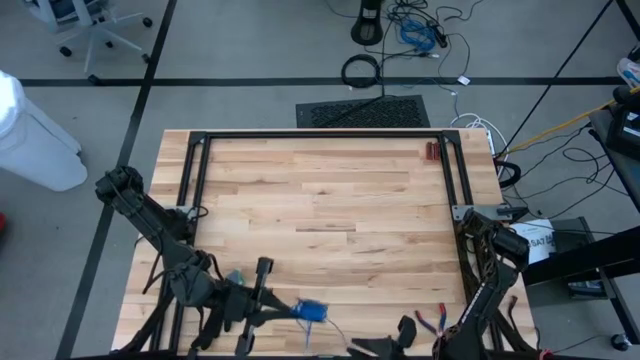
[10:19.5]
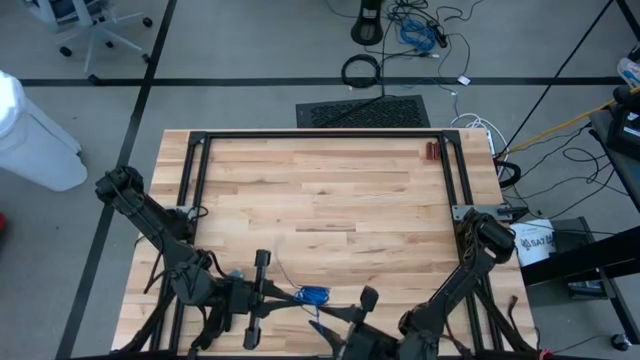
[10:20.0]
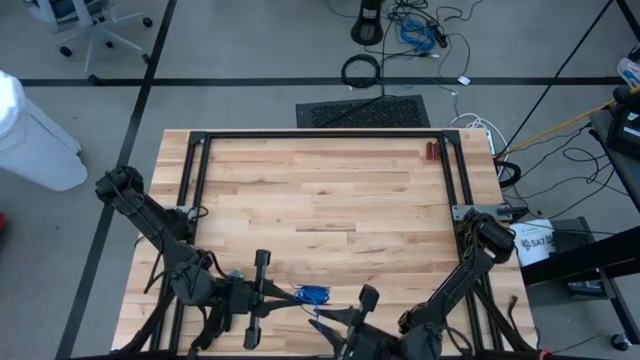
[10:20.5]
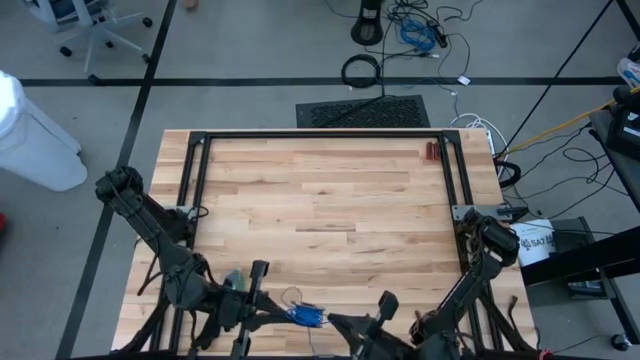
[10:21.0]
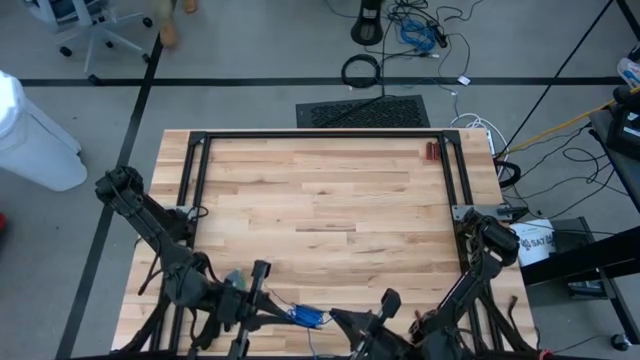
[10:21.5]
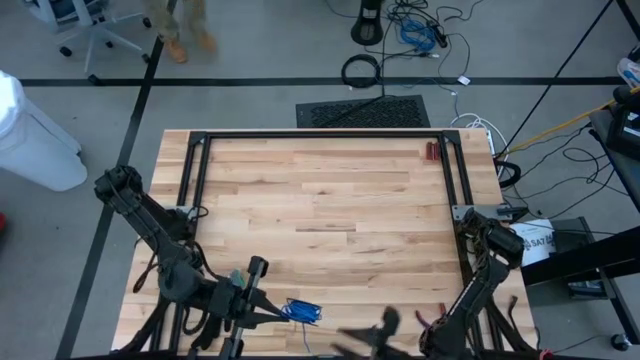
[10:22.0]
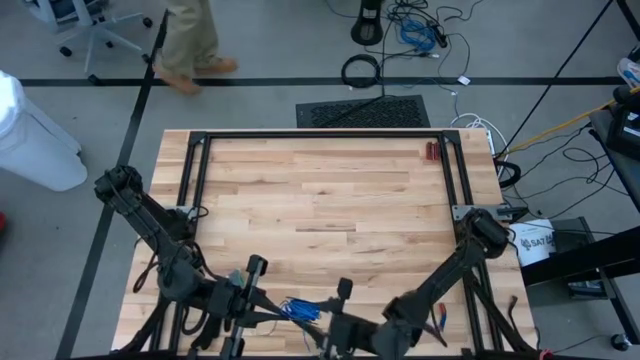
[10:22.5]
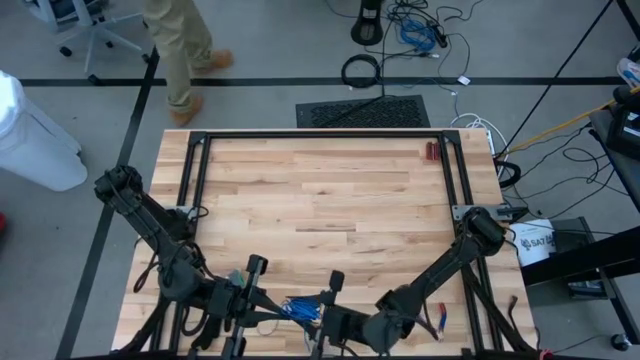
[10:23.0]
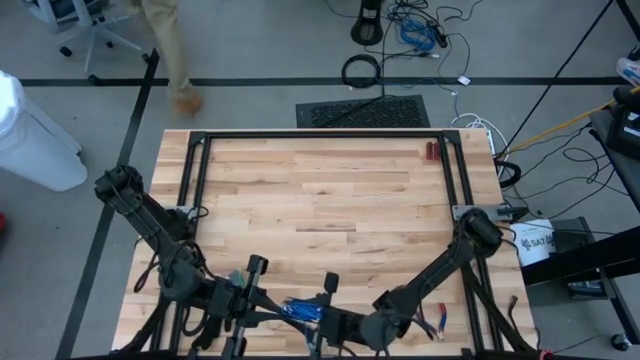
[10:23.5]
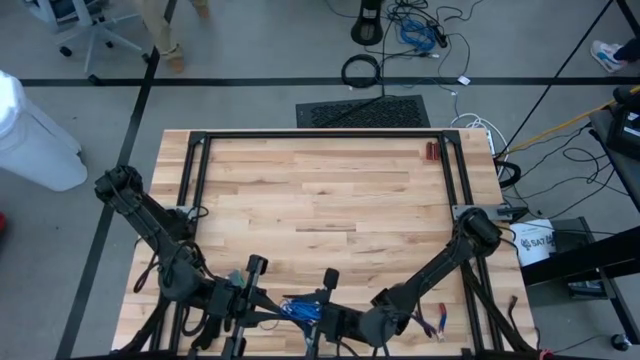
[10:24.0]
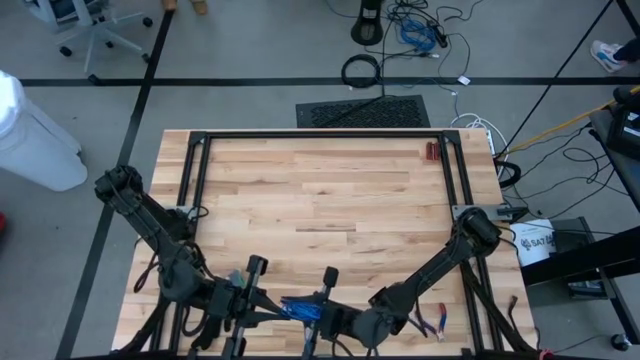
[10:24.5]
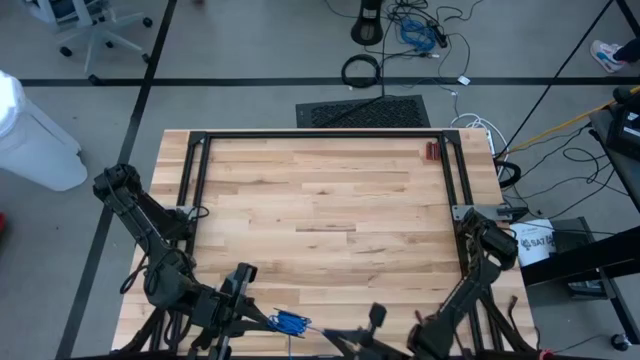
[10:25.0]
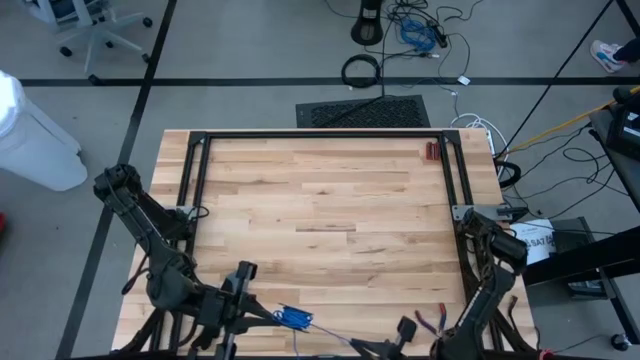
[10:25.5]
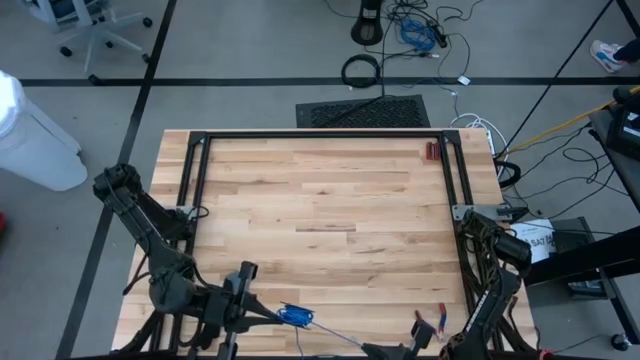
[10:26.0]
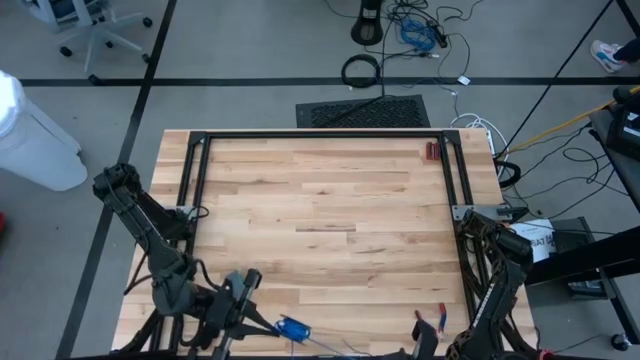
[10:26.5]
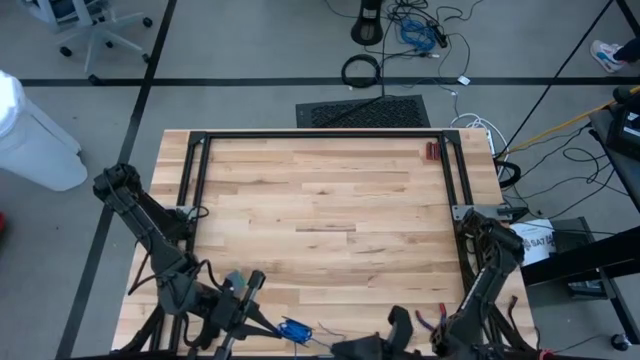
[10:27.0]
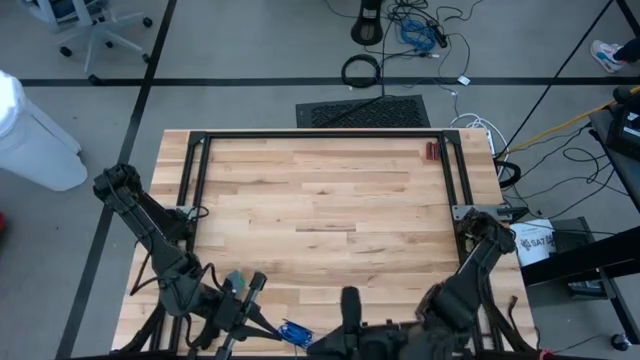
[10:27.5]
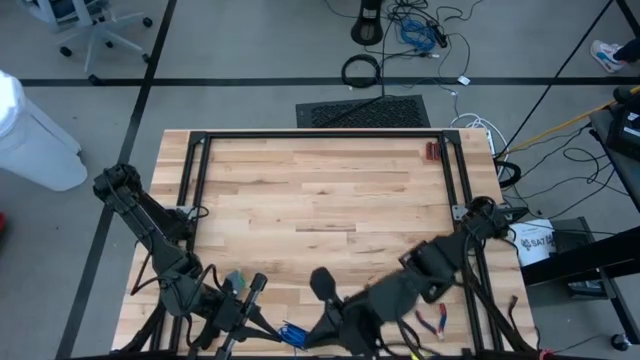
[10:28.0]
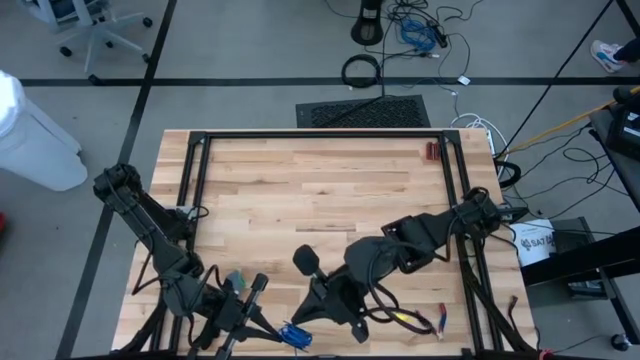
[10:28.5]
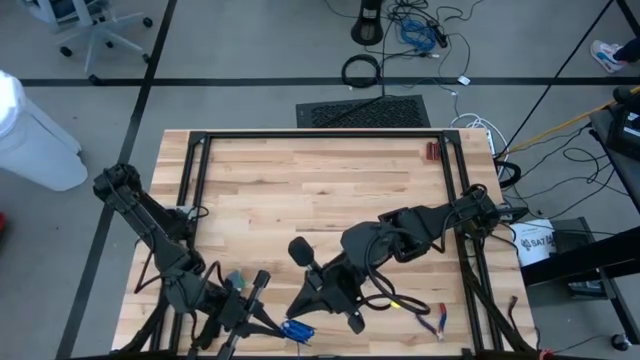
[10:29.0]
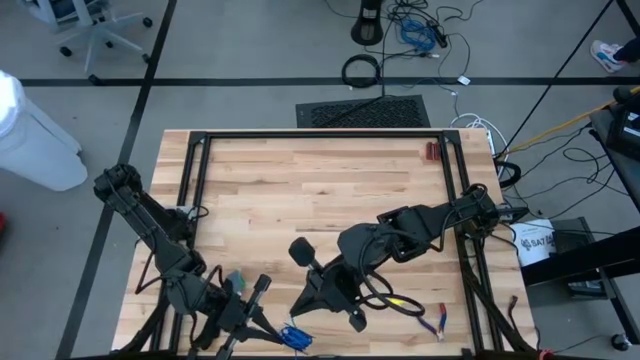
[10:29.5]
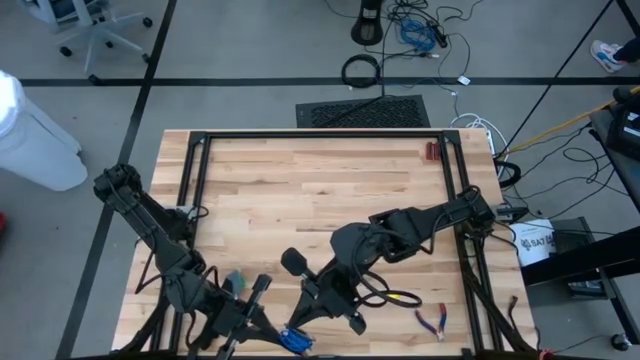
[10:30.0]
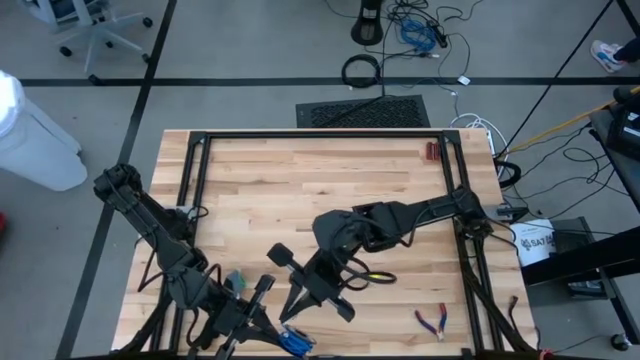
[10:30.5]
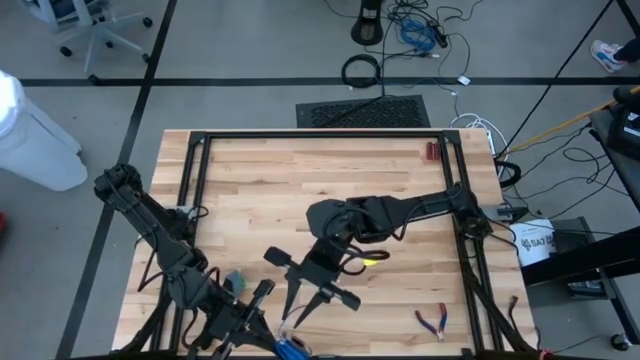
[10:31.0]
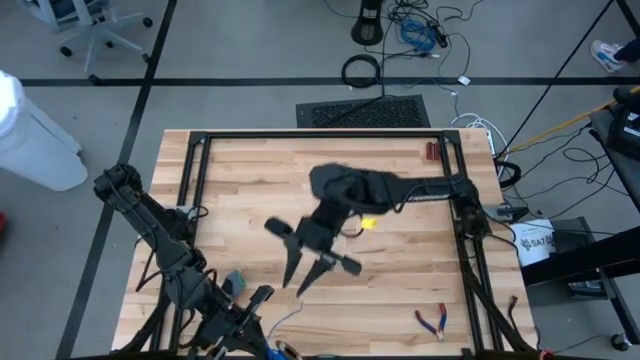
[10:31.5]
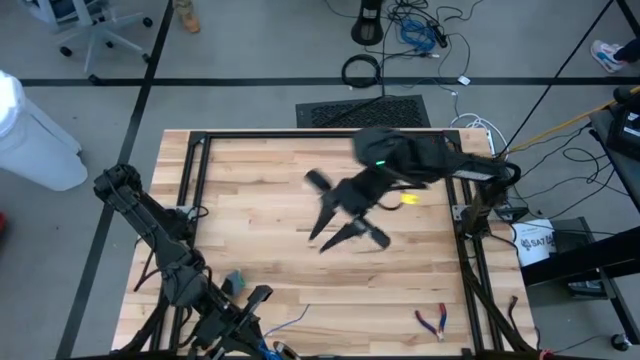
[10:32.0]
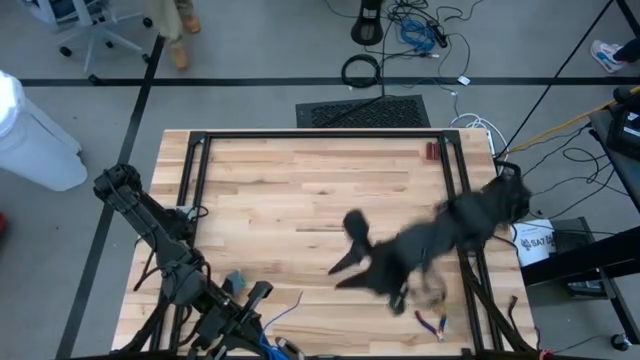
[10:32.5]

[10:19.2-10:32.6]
Task: Coil cords
Coil the blue wire onto the black spool

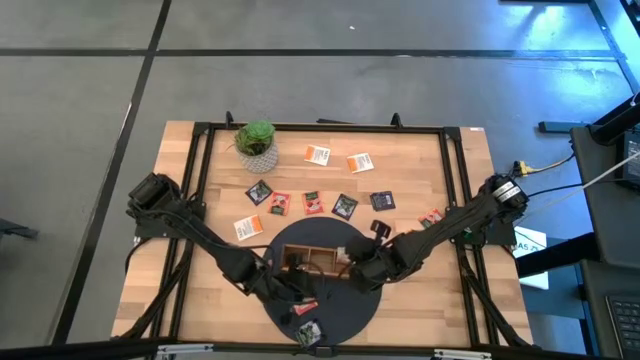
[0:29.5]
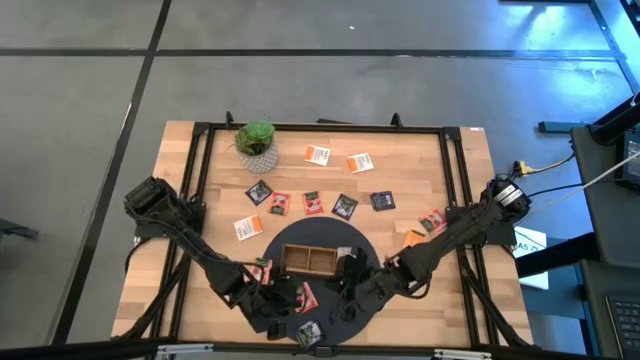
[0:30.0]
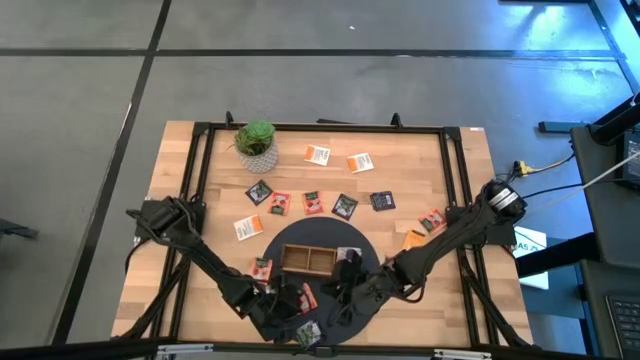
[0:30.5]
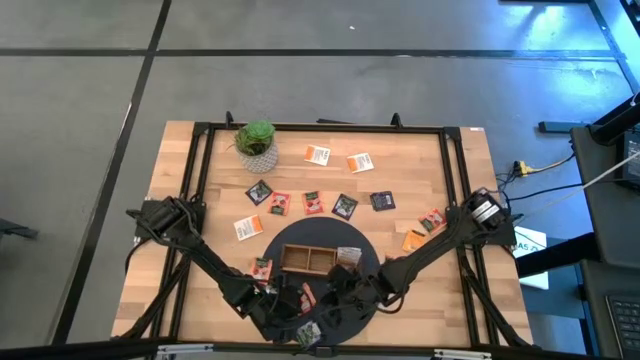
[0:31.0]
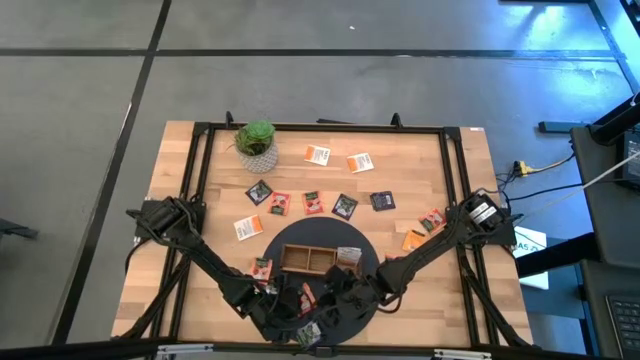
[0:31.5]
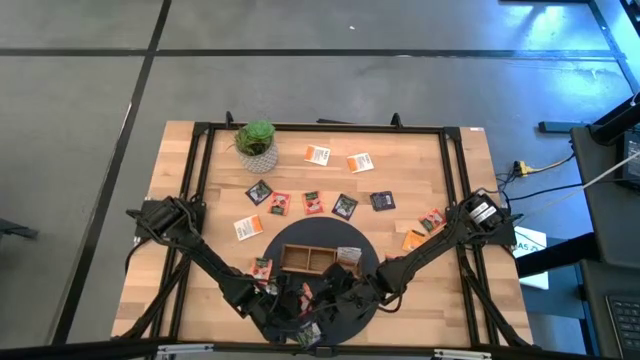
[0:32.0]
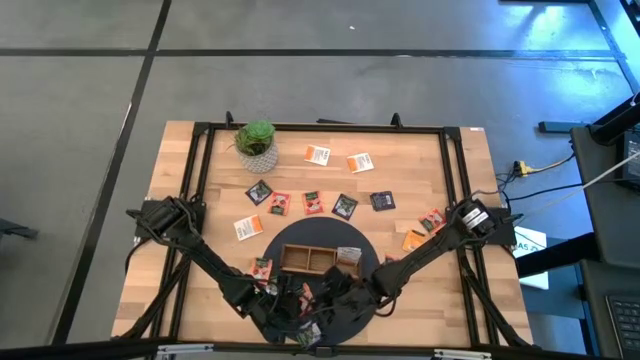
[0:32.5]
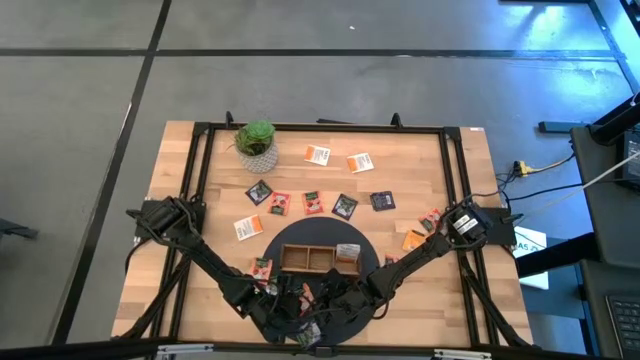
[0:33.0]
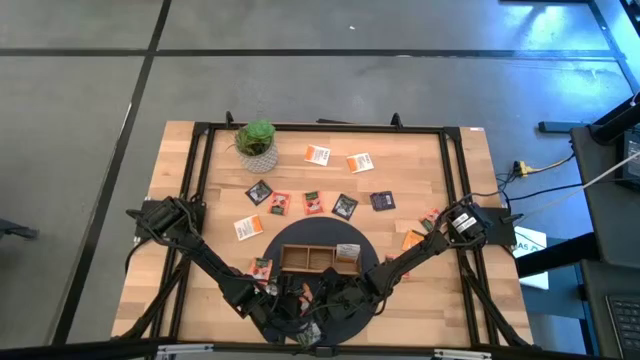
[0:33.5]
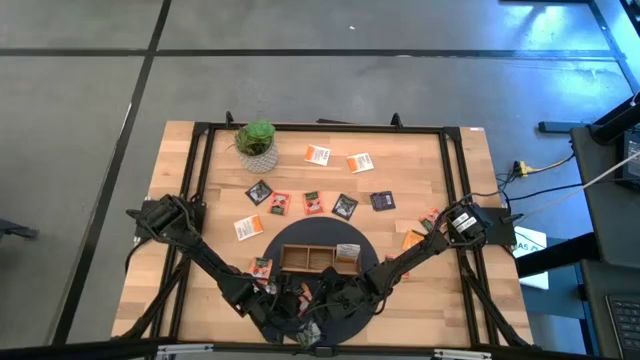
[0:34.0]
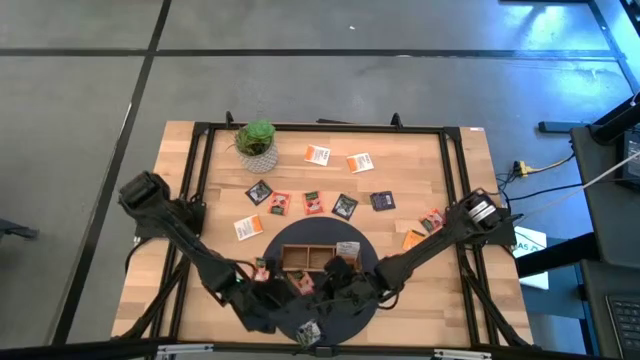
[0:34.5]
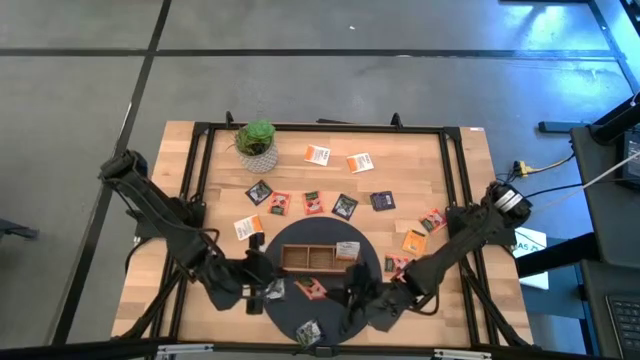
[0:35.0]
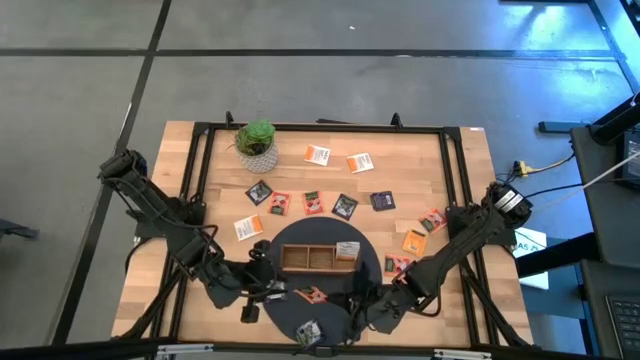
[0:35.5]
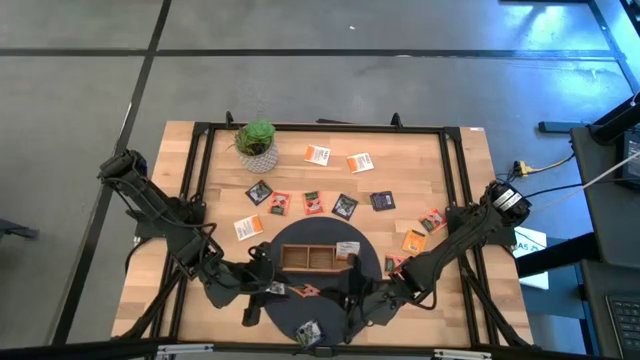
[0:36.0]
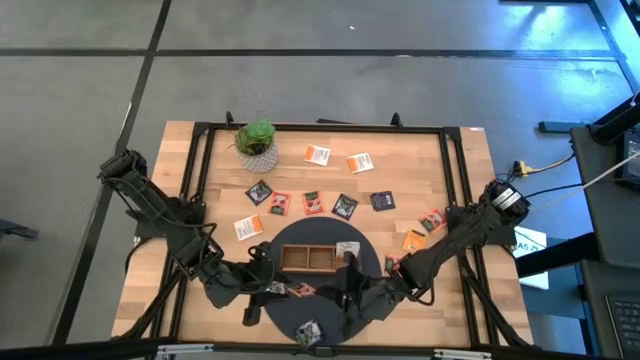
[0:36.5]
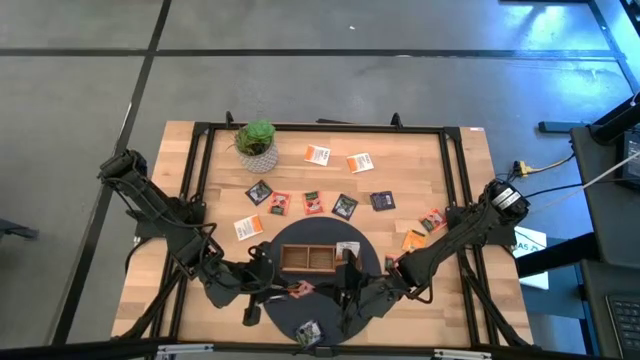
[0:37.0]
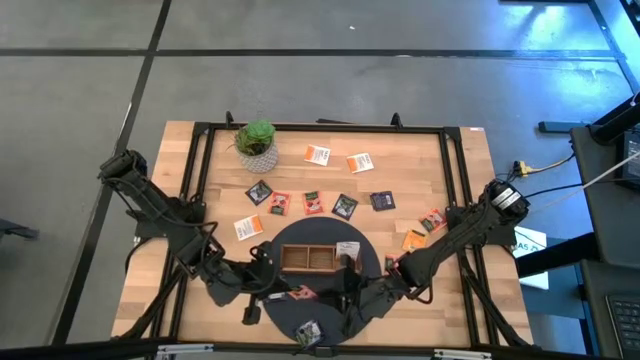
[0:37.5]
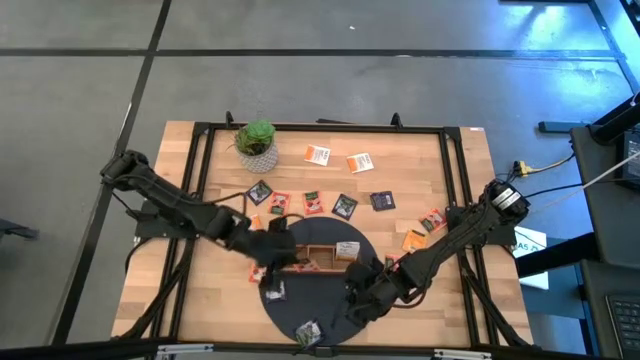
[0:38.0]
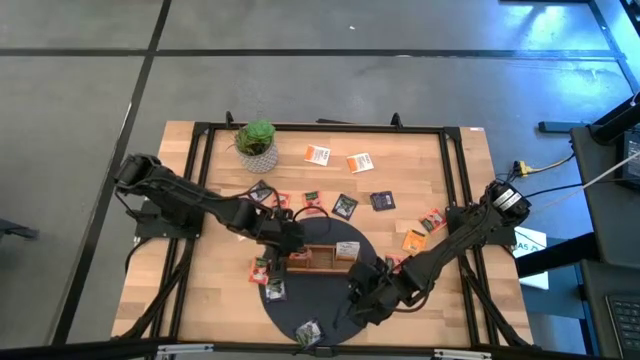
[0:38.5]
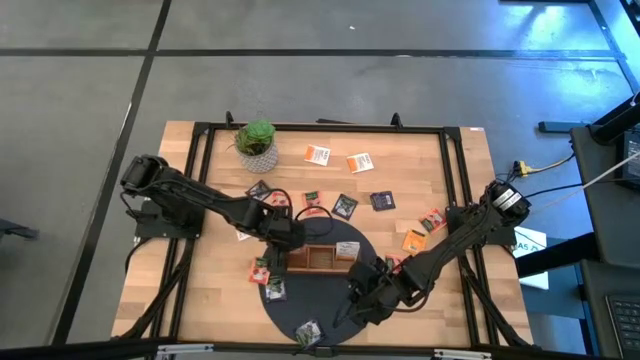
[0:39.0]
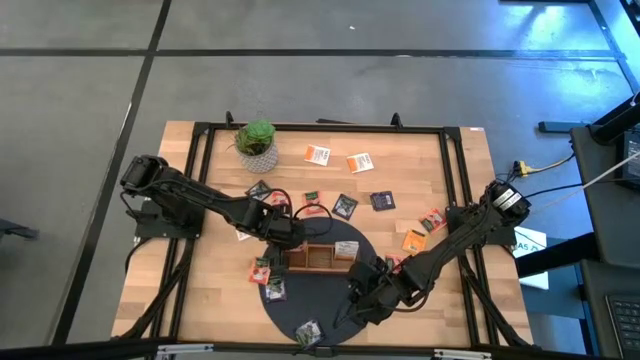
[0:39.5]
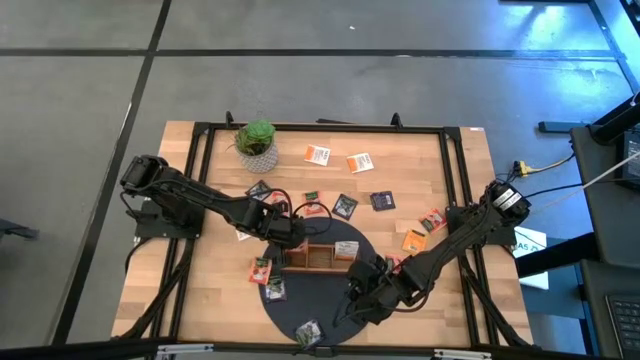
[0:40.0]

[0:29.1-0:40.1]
Task: Pick & Place Tea
Put the orange tea bag into the left slot of the wooden organizer
